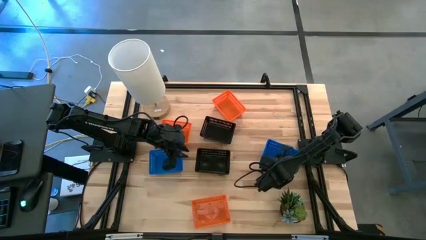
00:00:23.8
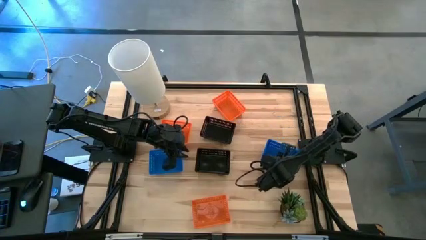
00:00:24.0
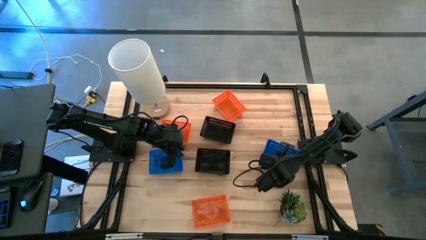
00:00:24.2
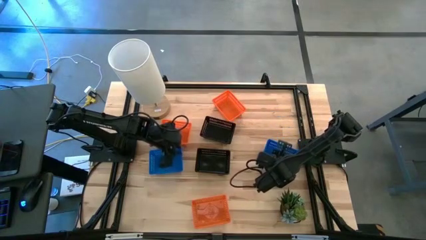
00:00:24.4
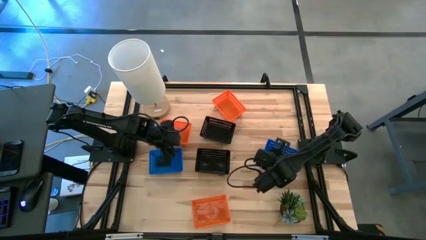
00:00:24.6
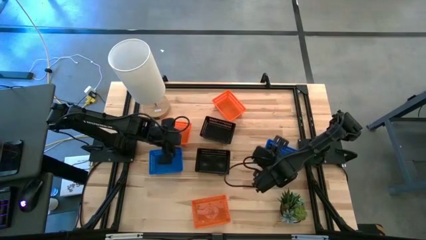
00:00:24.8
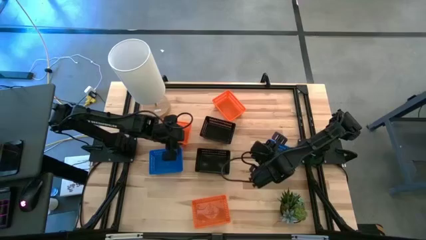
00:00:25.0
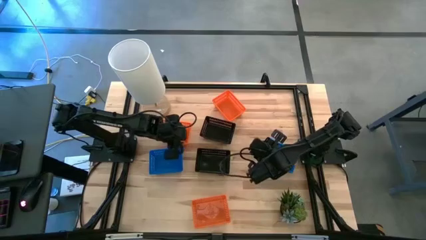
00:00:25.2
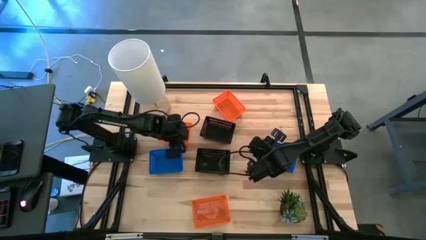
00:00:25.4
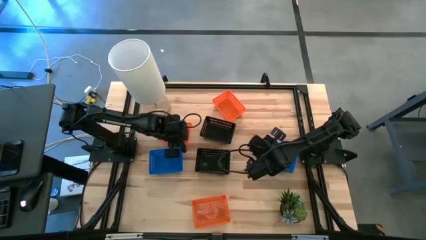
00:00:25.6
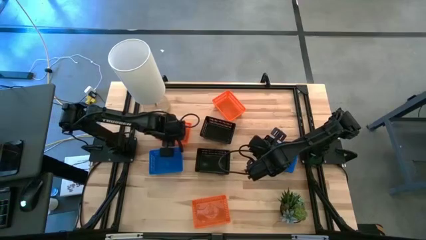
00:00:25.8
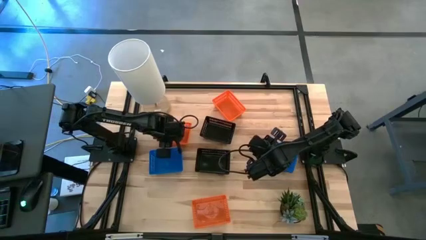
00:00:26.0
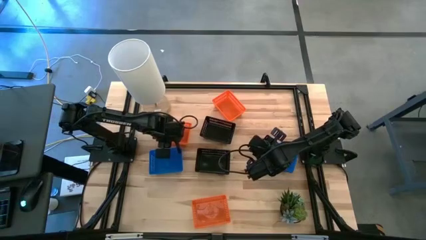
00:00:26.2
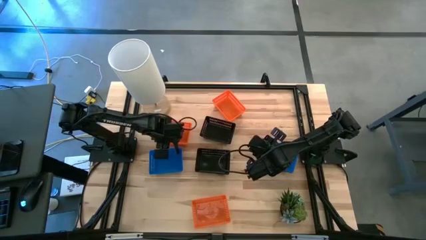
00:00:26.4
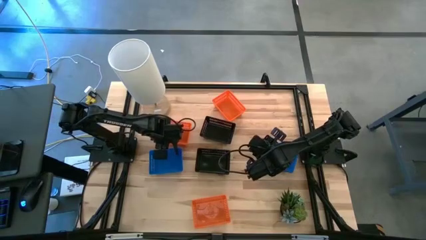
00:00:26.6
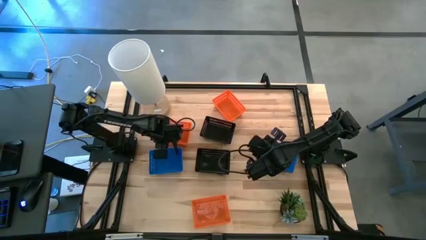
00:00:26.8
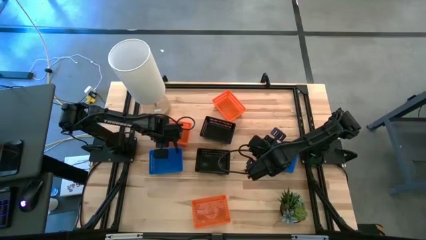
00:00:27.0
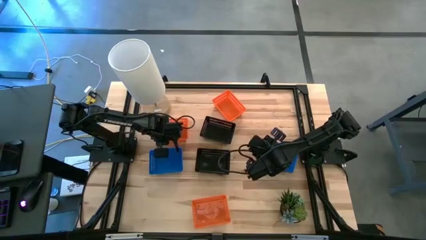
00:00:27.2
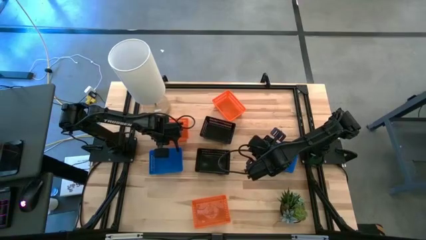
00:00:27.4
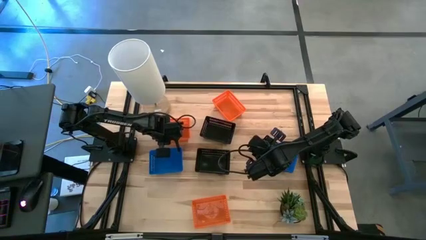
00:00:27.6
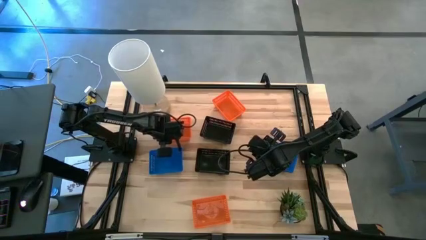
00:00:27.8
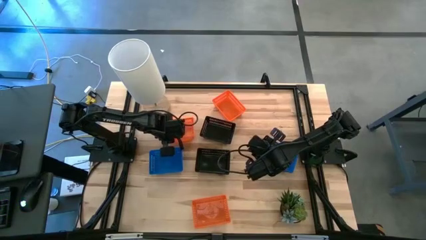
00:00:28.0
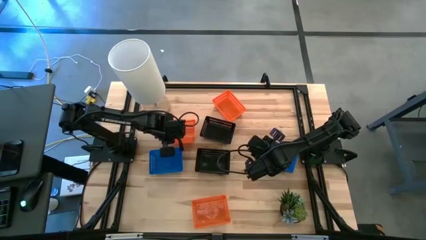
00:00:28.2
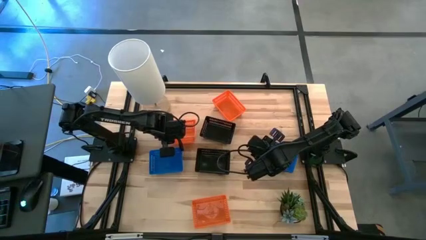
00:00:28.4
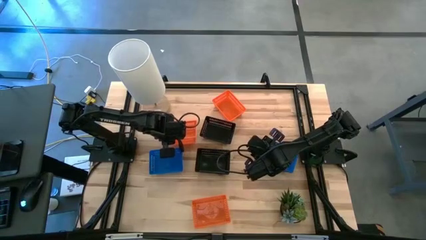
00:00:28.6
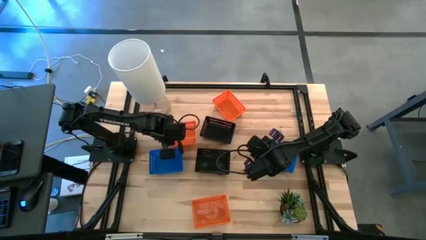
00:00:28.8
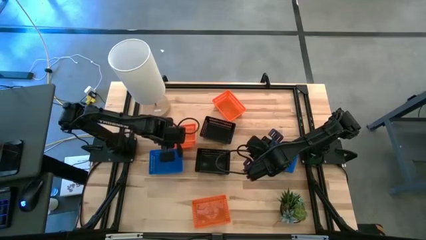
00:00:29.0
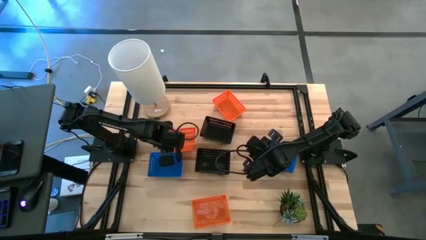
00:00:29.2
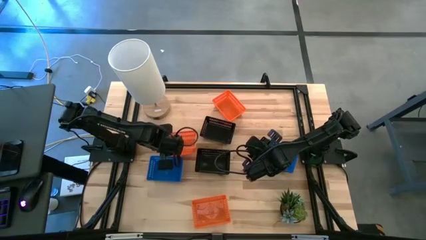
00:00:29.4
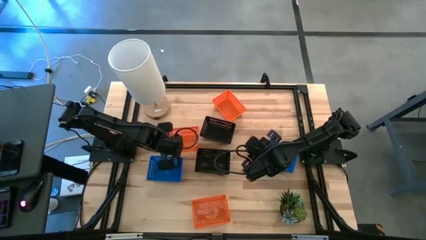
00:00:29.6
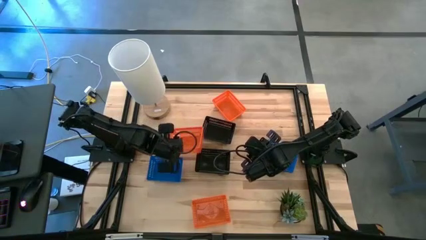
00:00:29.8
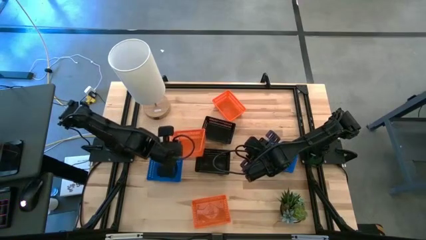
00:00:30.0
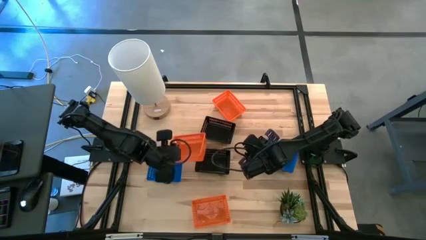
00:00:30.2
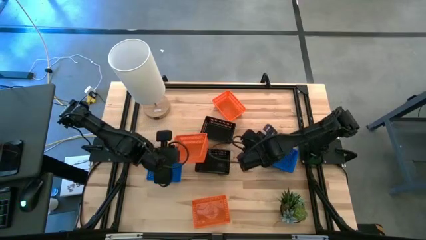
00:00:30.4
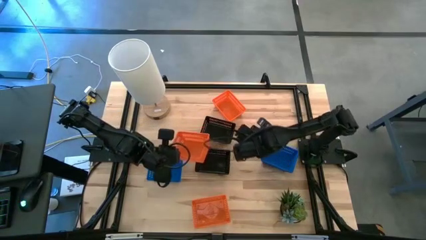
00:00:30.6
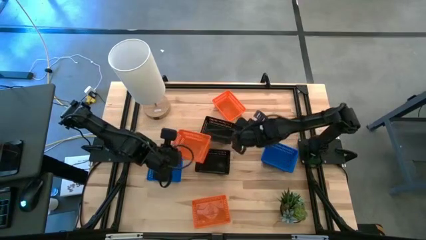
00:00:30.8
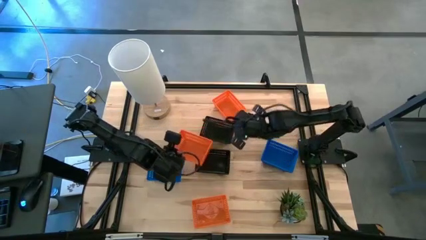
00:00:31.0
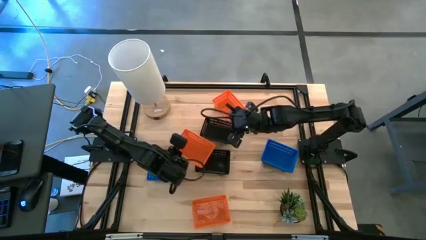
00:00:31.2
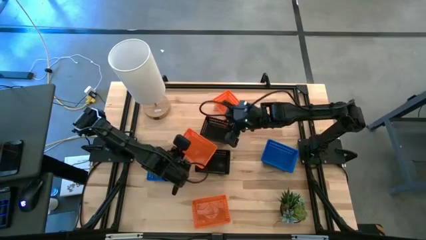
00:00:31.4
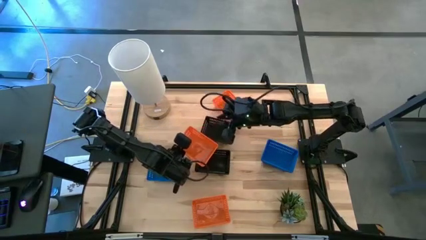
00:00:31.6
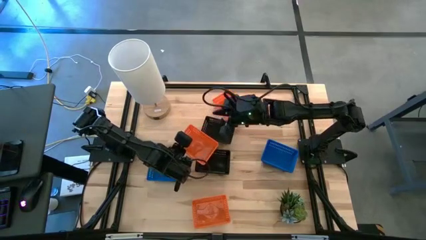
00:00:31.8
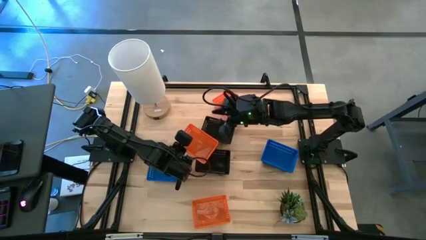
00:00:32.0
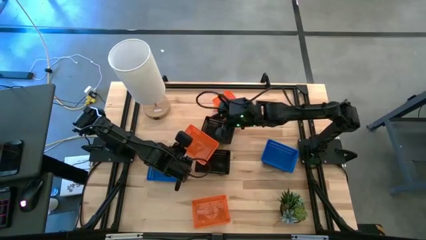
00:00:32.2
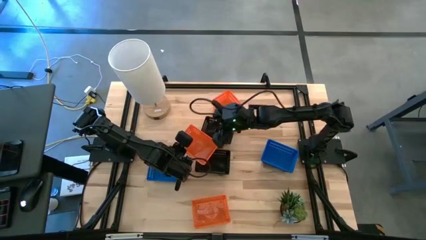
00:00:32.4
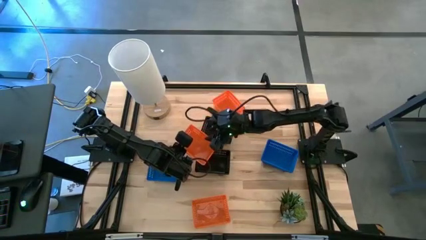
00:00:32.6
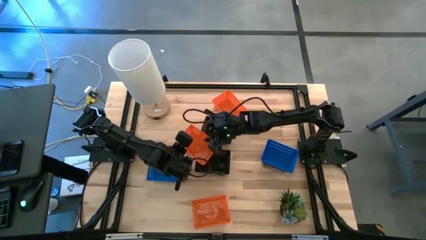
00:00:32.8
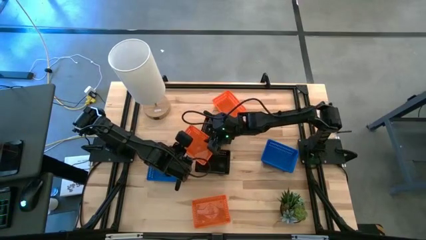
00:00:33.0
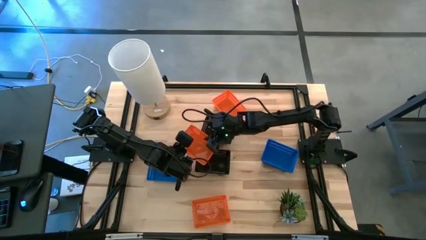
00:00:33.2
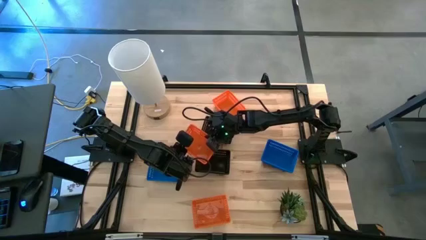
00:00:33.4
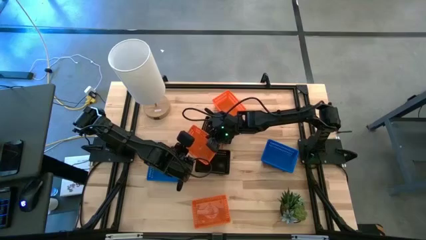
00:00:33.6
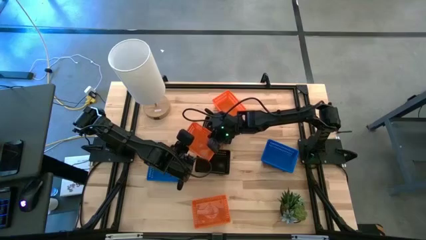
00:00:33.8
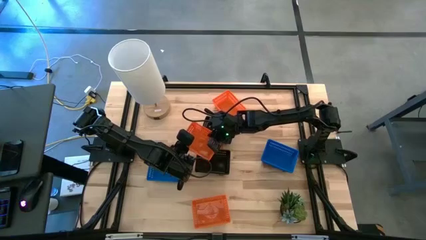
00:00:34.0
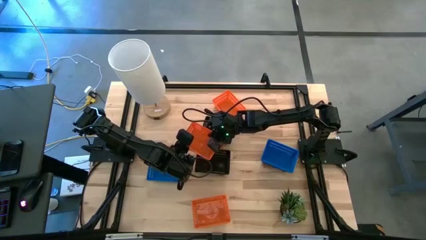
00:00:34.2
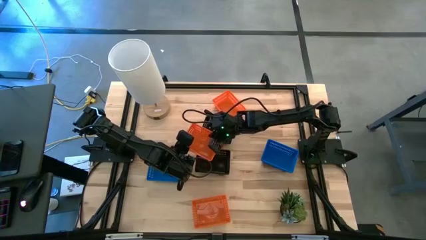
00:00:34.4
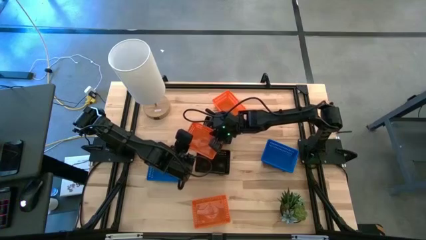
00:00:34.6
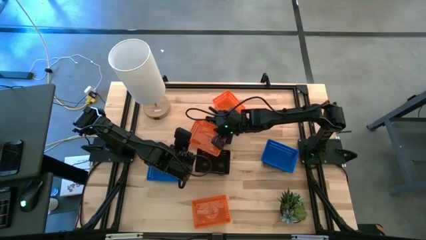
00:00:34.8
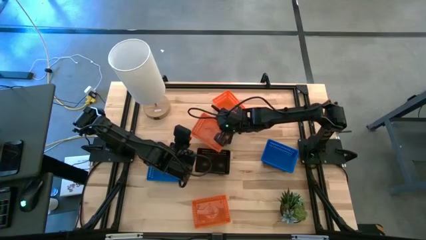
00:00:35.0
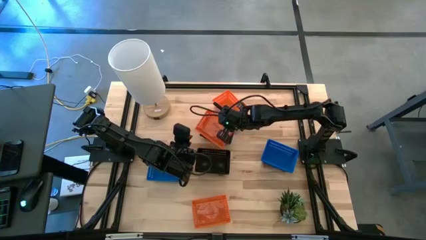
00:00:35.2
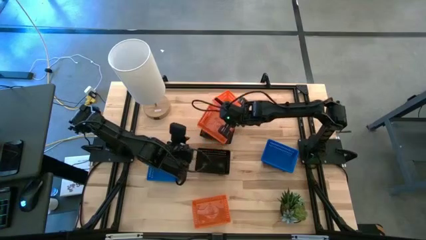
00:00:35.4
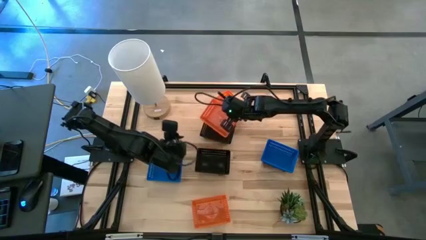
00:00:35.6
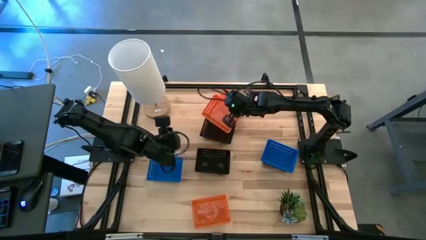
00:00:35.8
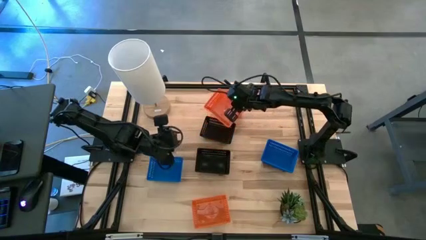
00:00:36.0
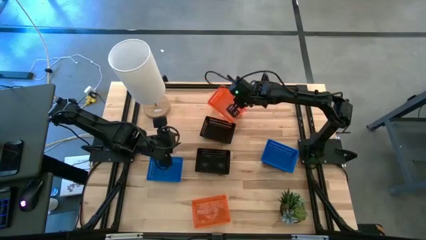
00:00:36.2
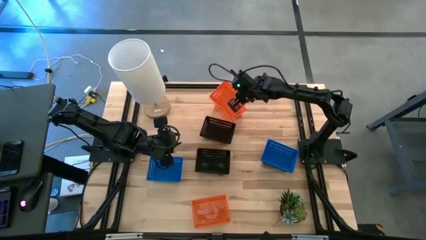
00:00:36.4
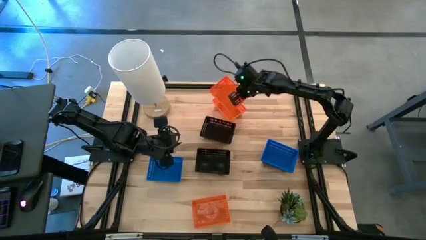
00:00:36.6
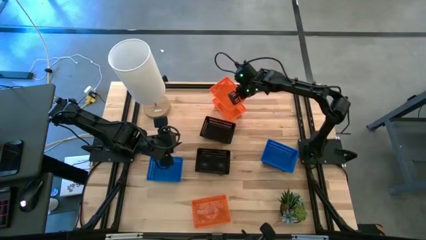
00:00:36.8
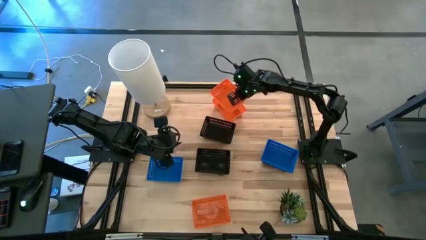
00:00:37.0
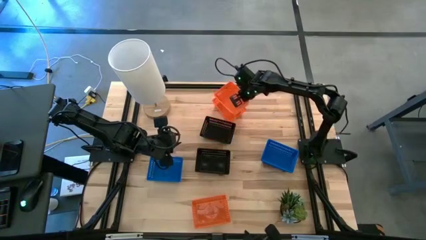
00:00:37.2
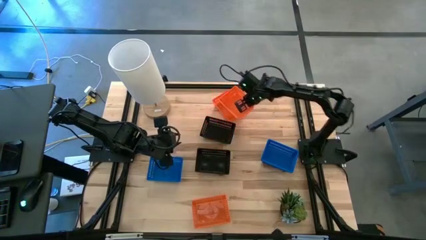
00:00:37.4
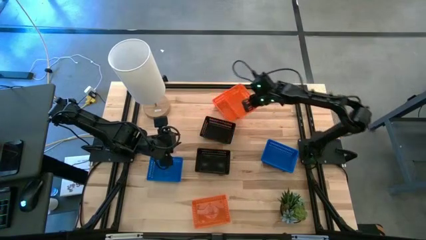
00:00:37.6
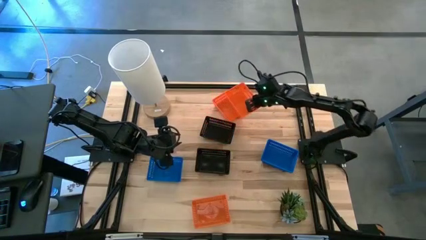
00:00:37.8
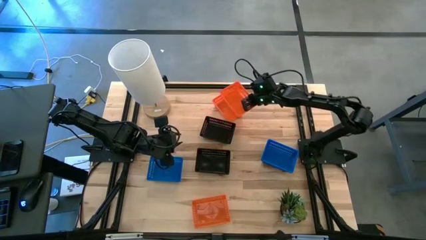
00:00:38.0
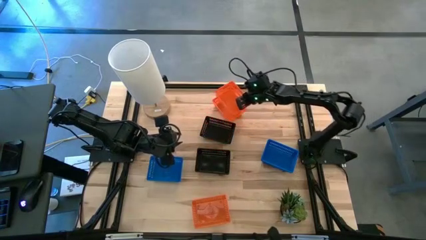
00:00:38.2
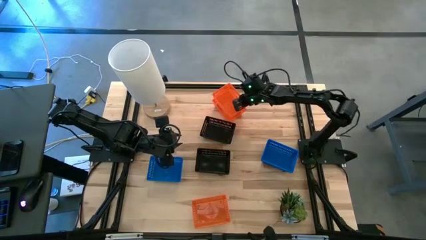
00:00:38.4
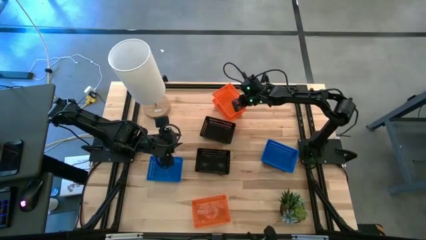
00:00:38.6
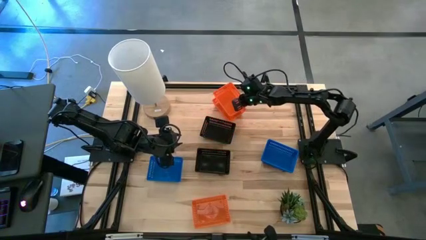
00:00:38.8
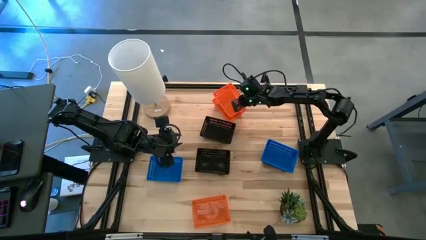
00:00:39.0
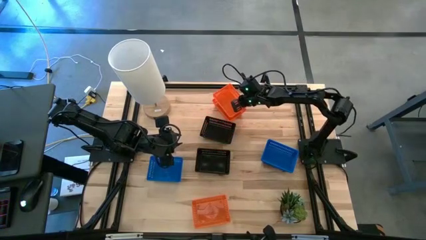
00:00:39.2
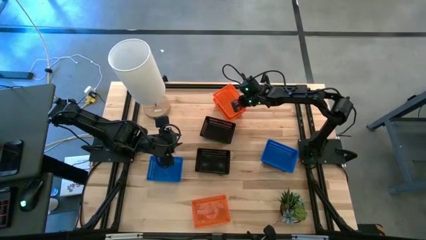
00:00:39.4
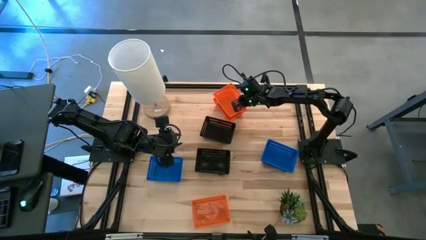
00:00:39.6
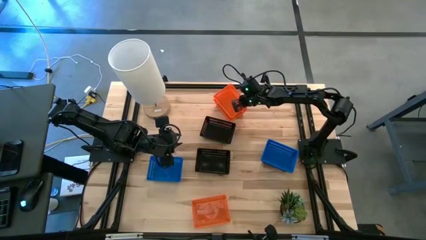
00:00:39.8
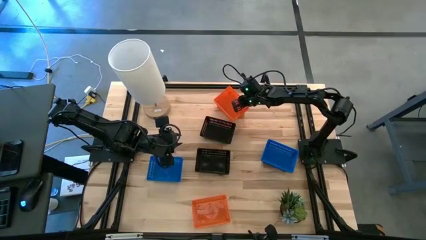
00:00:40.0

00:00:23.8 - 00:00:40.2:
Stack the left orange bin on the top right orange bin

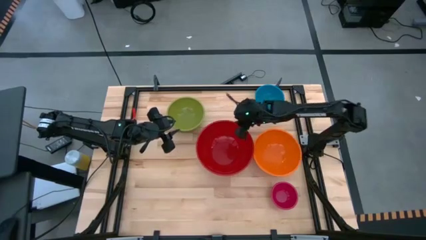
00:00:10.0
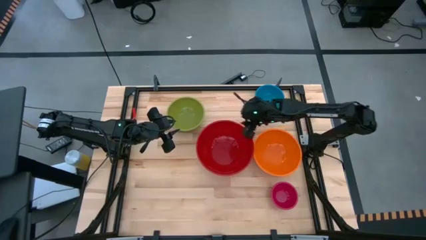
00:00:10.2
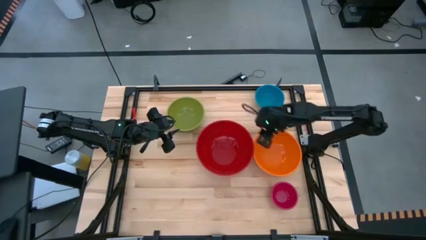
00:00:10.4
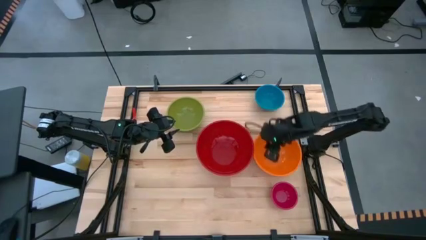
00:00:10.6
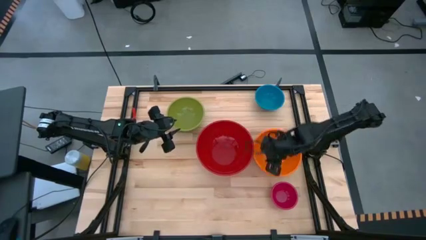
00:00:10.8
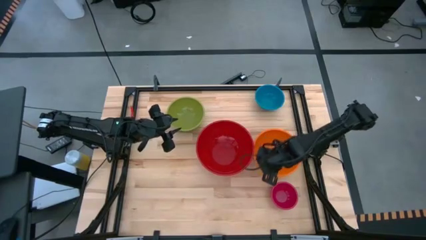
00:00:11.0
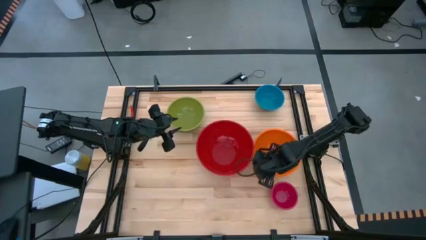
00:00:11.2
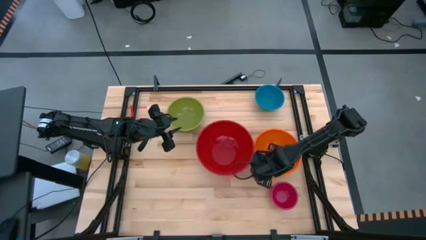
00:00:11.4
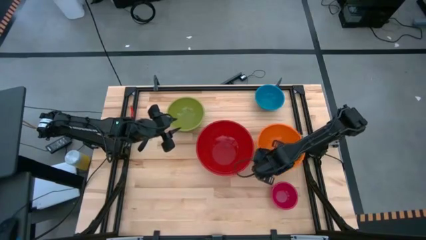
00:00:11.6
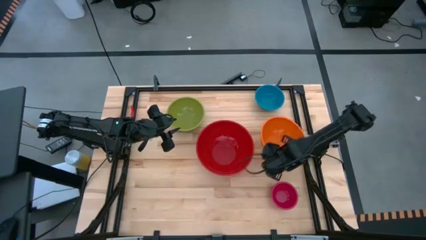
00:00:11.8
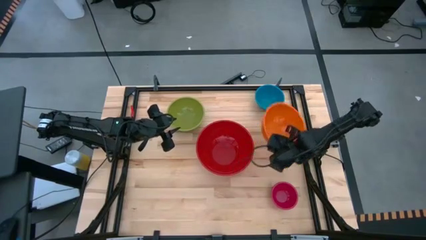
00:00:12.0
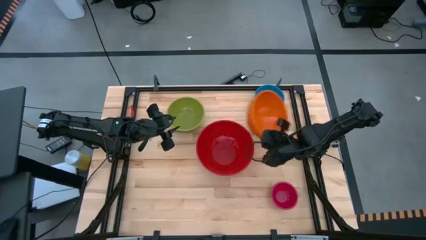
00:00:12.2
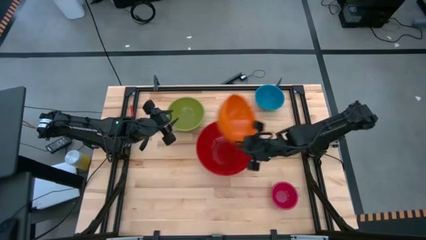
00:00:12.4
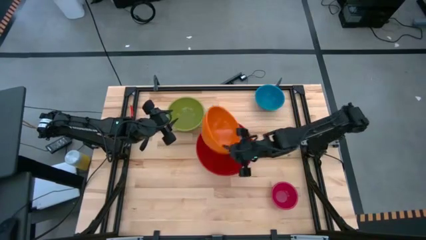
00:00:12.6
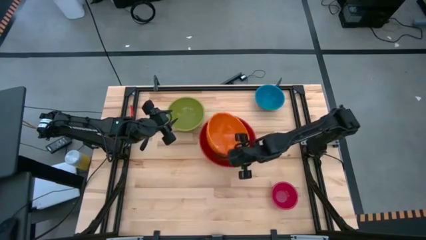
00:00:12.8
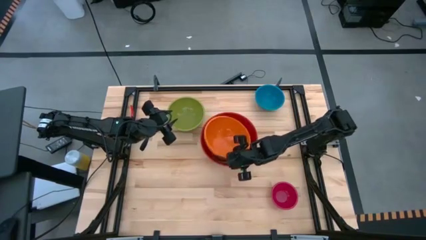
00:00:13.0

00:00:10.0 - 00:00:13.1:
Stack the orange bowl on the red bowl
